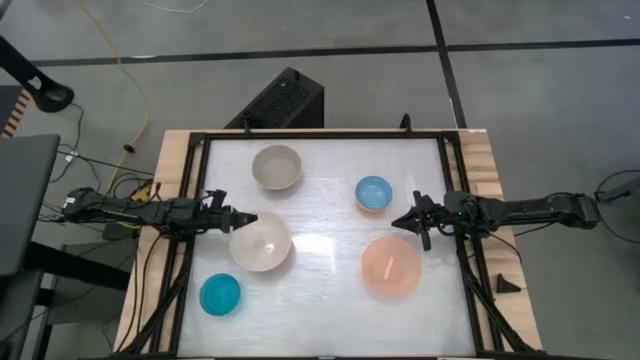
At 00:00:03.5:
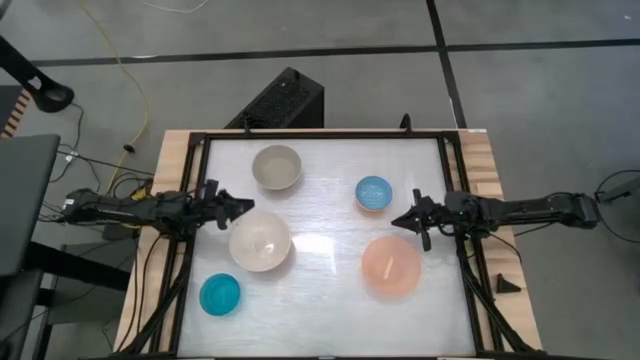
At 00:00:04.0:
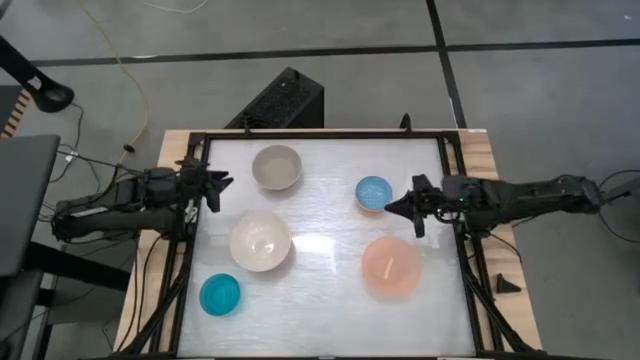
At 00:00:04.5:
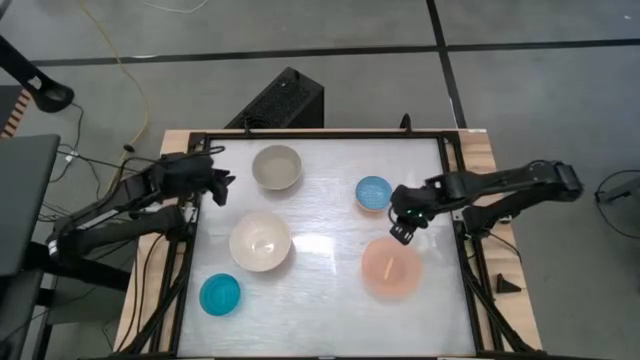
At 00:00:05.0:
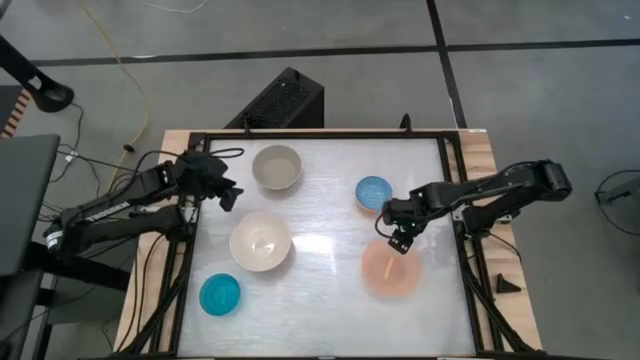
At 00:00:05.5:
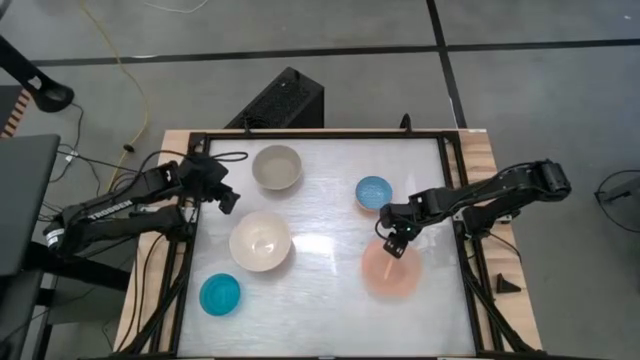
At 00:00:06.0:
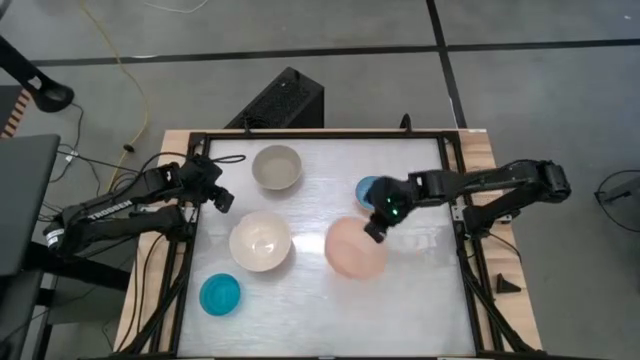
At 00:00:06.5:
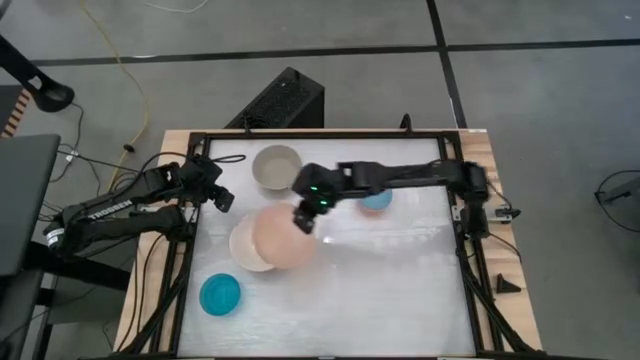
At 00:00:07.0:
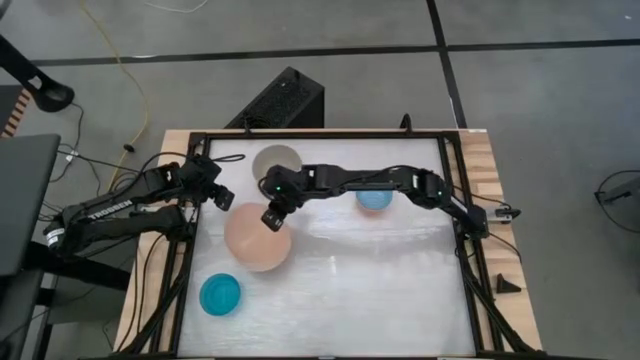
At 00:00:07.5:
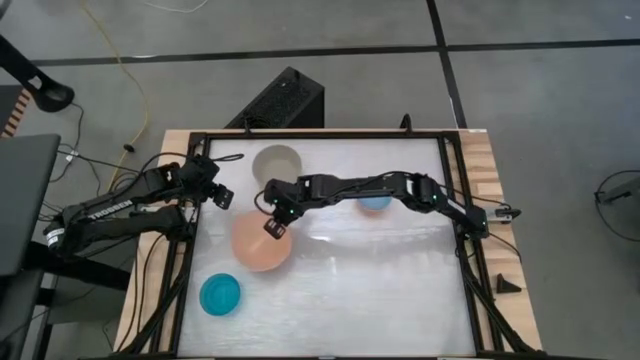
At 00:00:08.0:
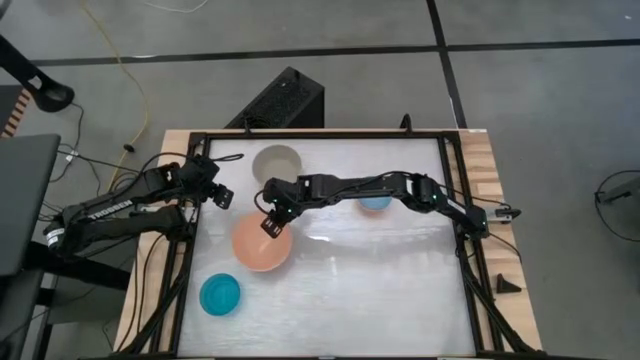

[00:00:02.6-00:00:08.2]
Stack the pink bowl on top of the white bowl

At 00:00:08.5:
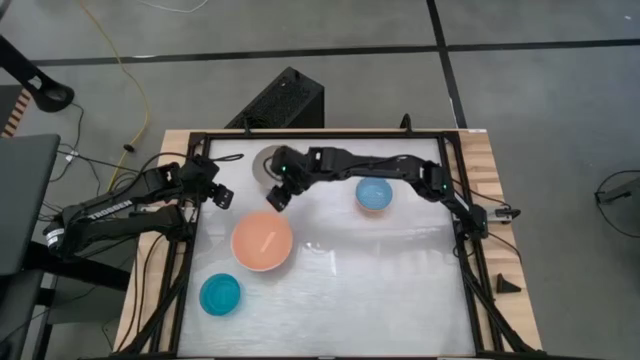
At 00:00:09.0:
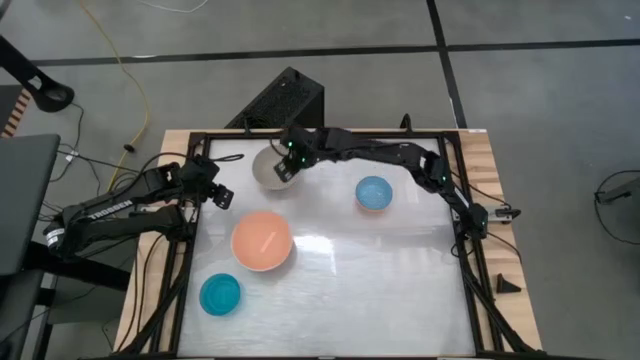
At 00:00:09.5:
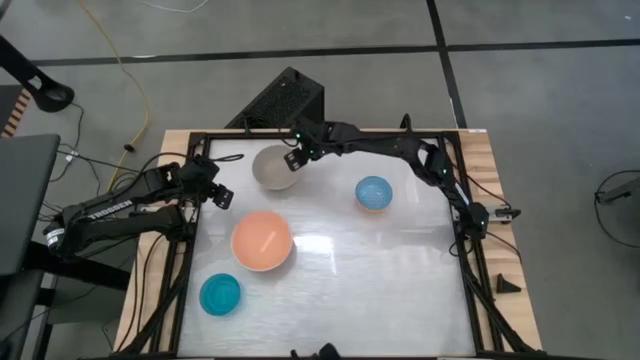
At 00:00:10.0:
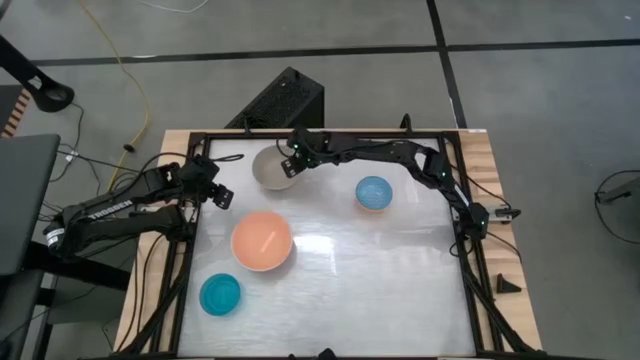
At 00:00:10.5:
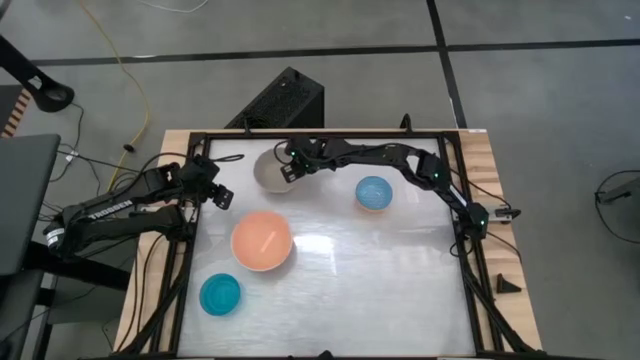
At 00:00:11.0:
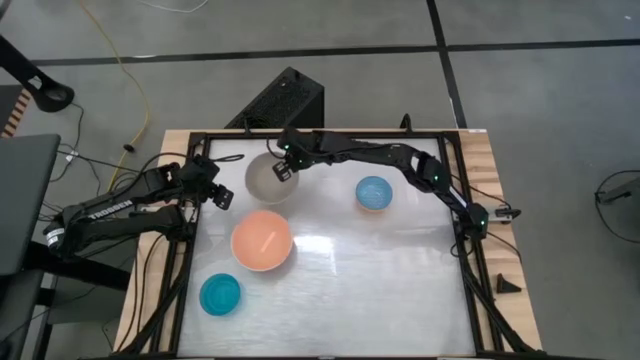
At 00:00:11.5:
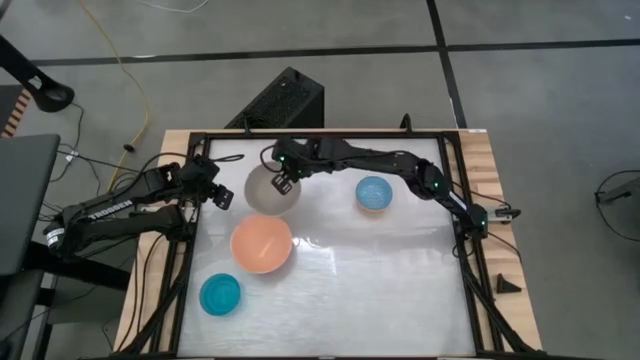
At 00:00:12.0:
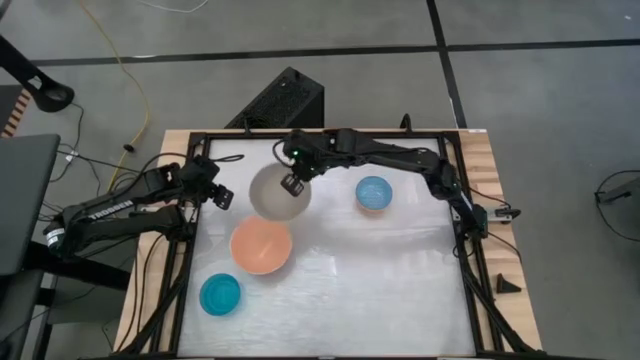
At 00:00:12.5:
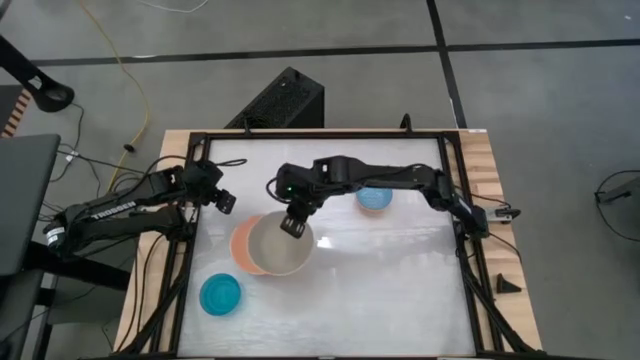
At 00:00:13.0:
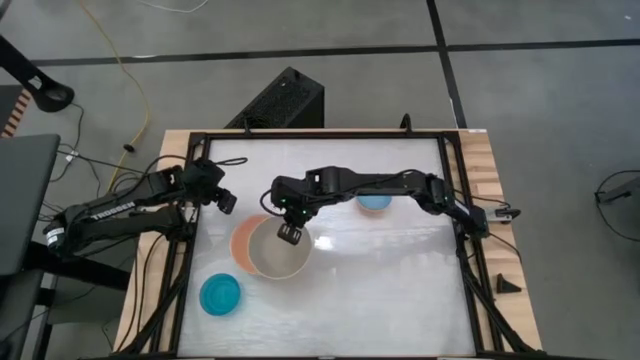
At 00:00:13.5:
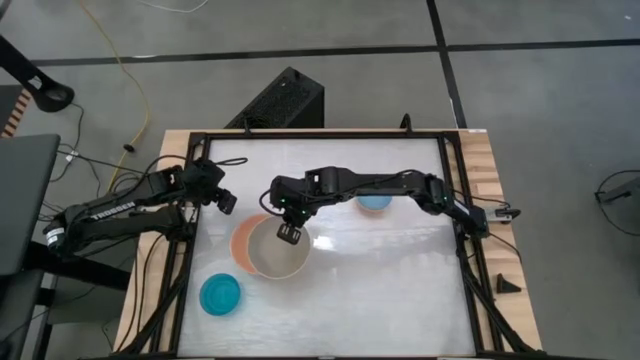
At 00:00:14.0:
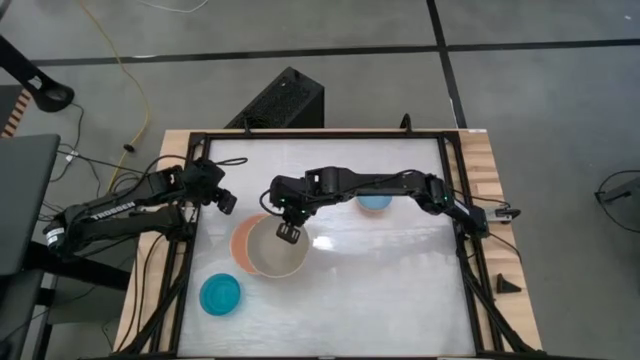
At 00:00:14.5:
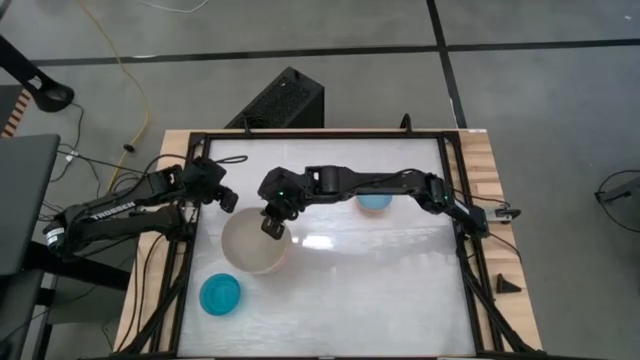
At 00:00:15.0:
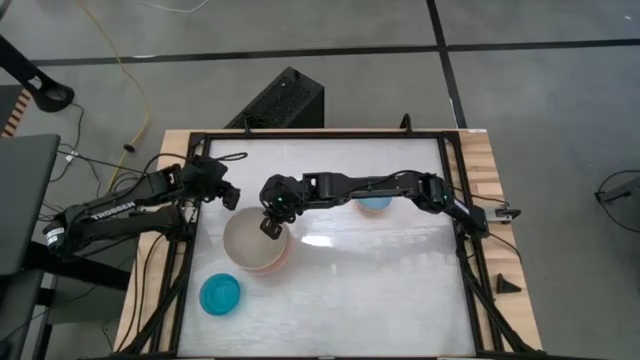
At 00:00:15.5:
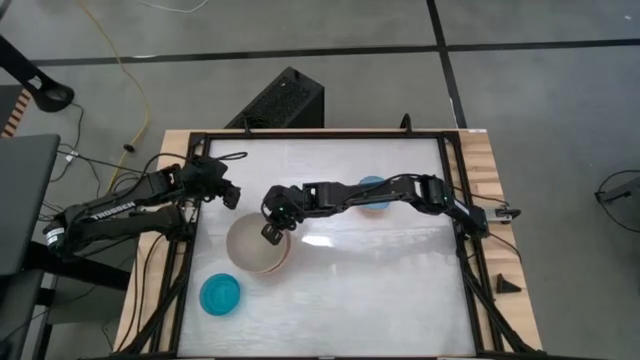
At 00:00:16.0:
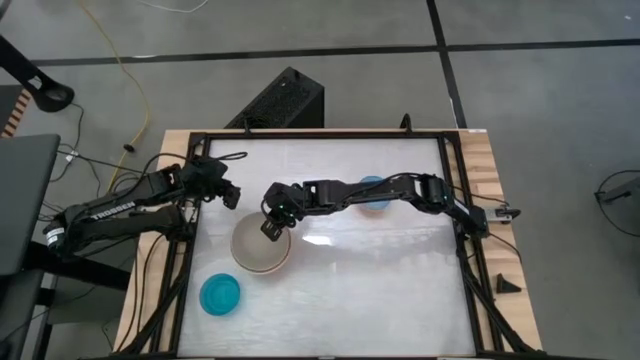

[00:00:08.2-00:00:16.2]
Stack the grey bowl on top of the pink bowl

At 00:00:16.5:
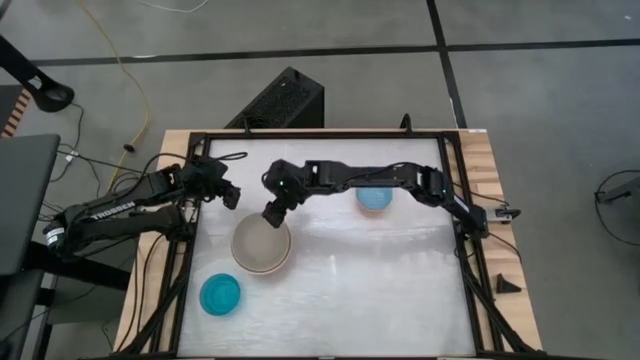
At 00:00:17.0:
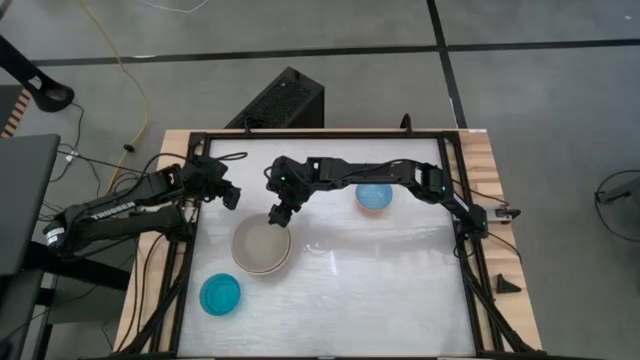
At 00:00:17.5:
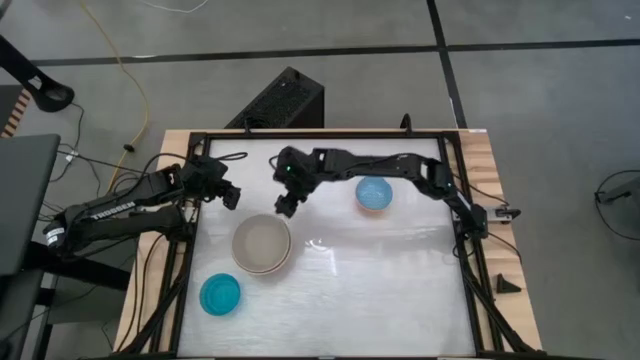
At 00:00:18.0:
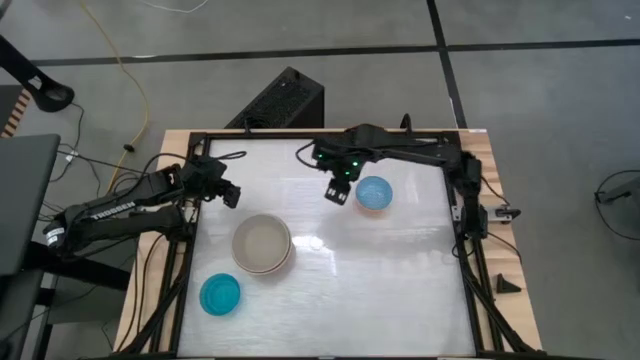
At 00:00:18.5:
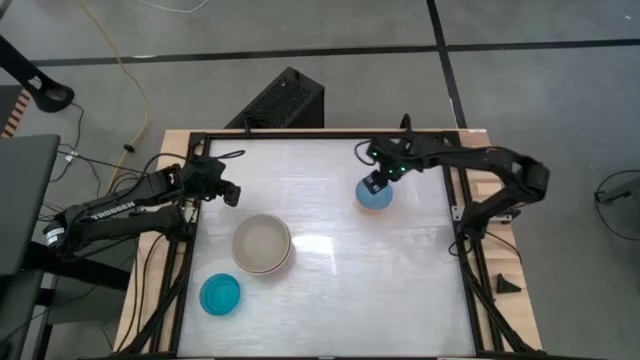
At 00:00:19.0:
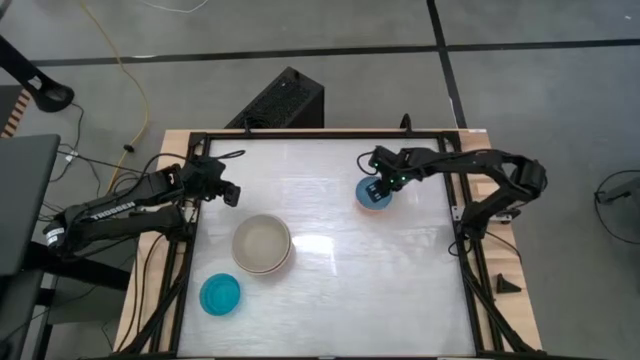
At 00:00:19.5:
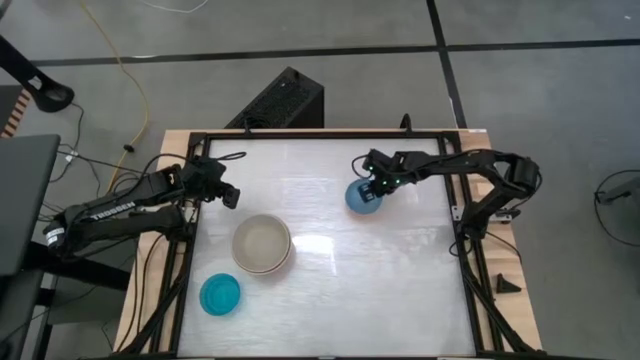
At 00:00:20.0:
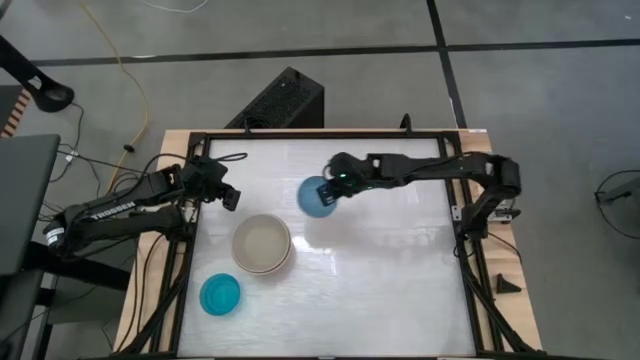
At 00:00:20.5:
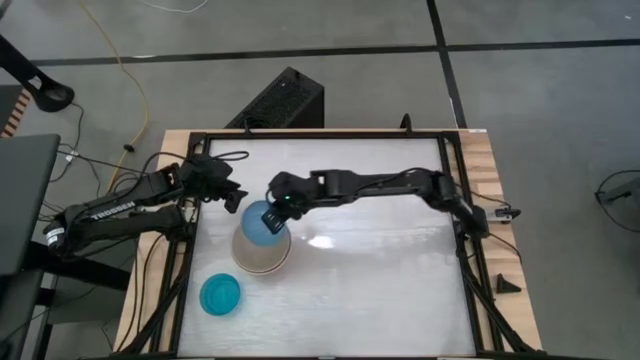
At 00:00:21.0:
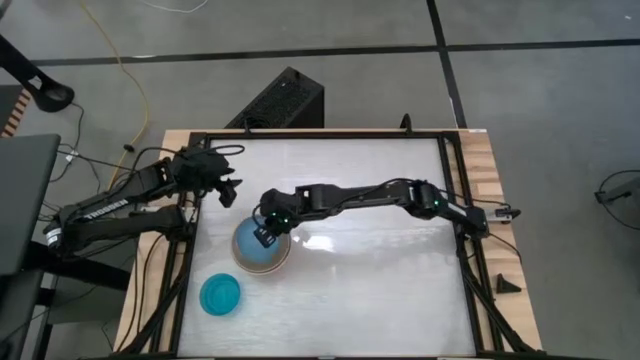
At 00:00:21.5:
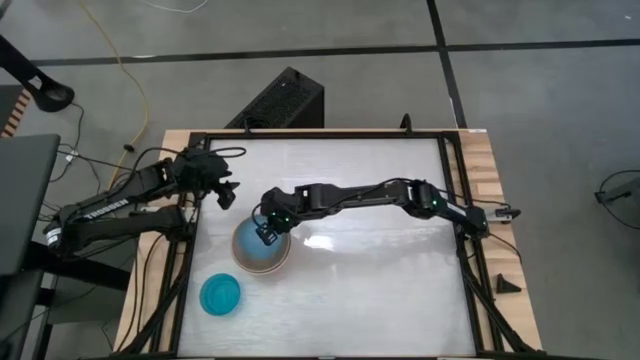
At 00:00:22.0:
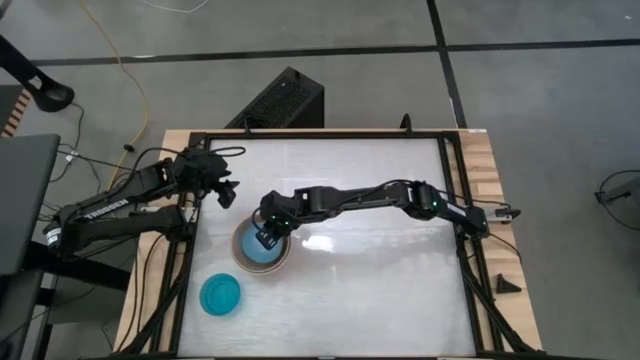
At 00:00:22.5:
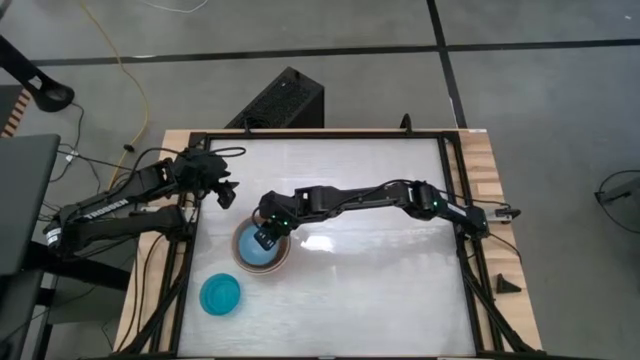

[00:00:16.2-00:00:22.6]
Stack the blue patterned bowl on top of the grey bowl
